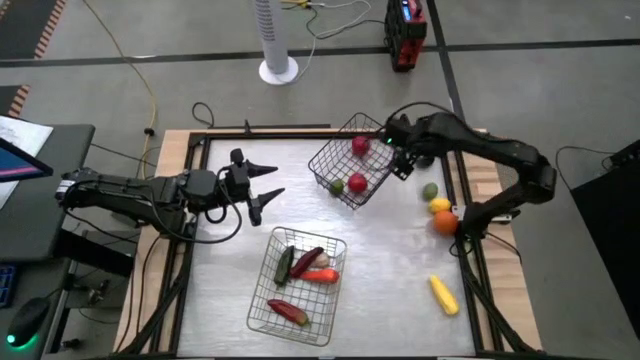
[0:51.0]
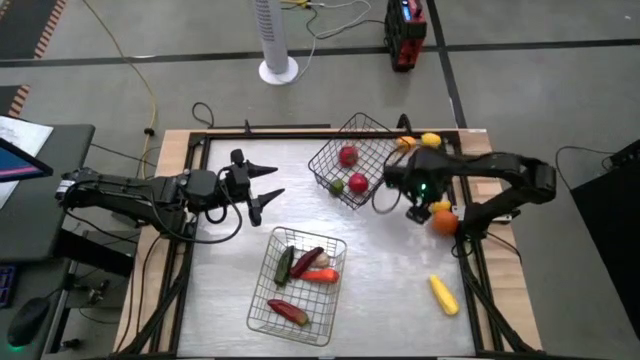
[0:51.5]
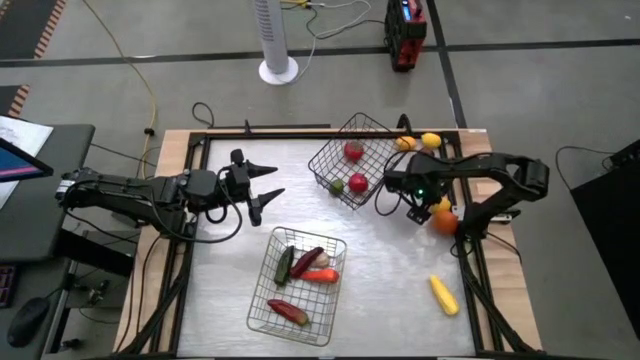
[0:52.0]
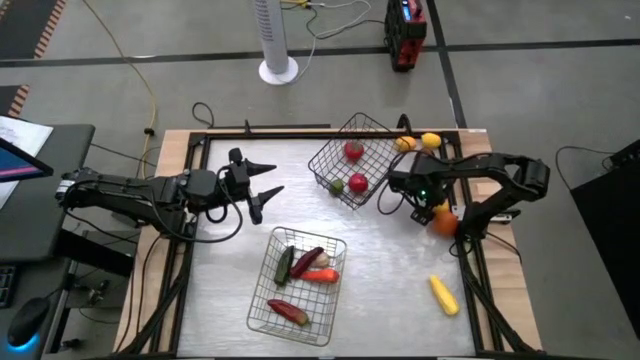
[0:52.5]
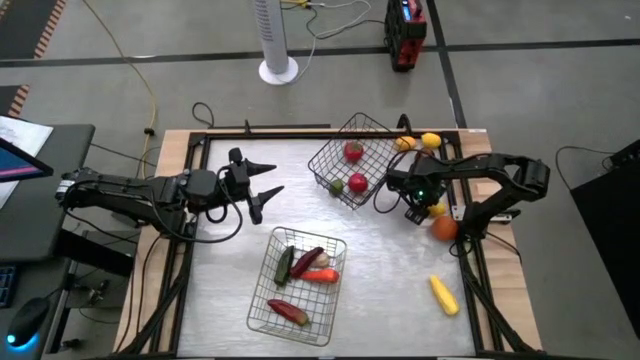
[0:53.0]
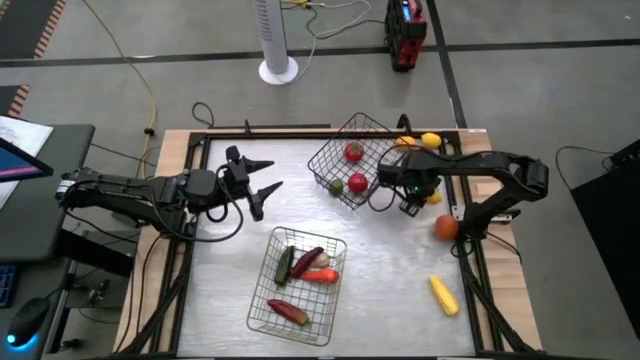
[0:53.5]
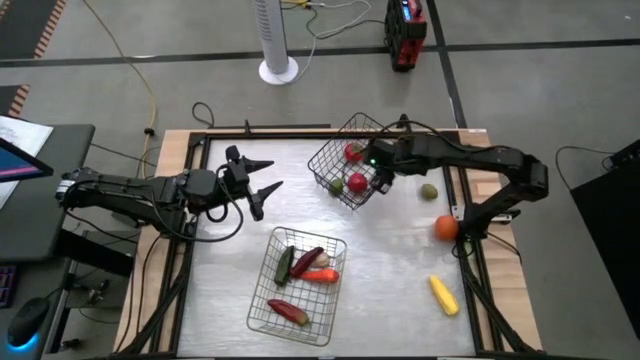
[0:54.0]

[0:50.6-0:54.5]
Task: Sort produce into baskets
Put the bottom yellow lemon into the black wire basket

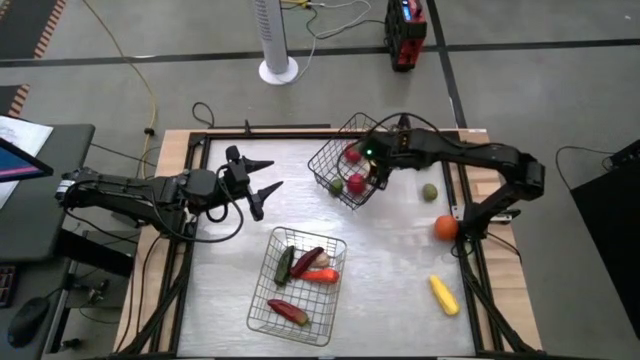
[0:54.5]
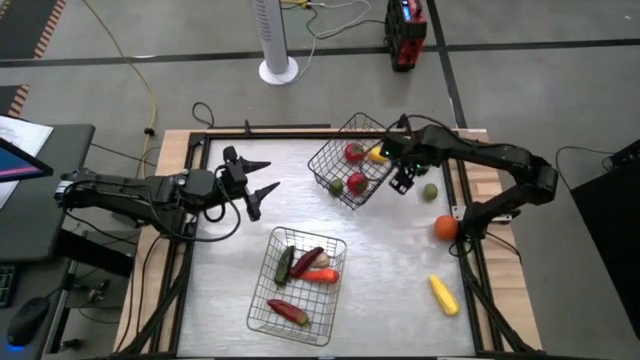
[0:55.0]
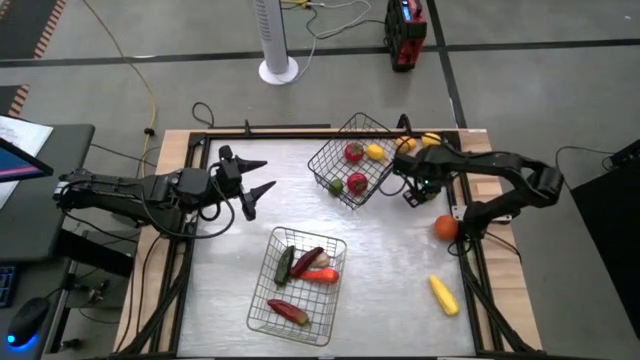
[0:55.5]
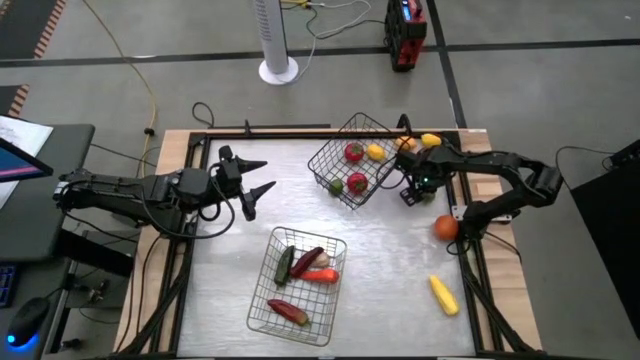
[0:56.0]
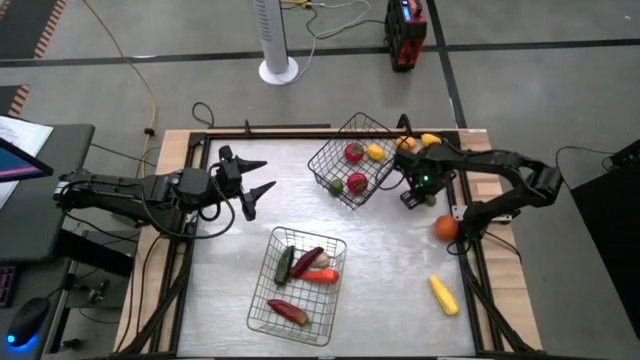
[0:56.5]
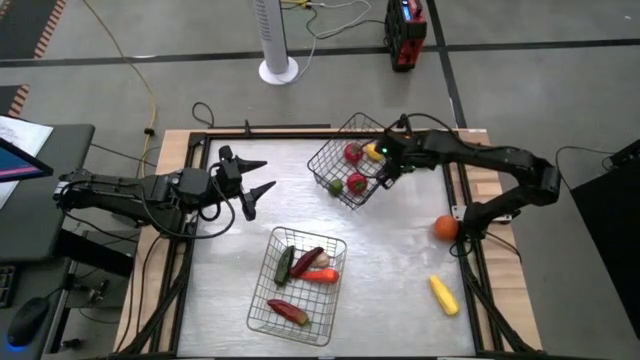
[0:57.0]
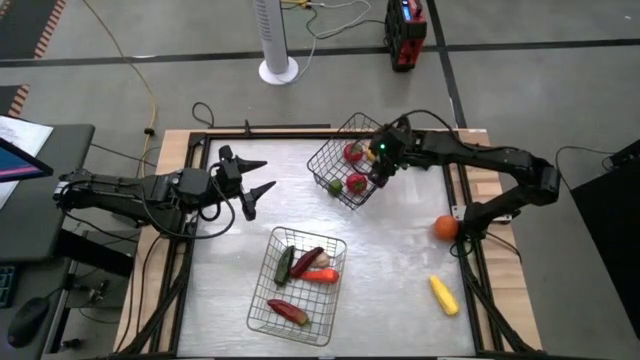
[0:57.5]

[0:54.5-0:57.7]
Put the green lime into the black wire basket

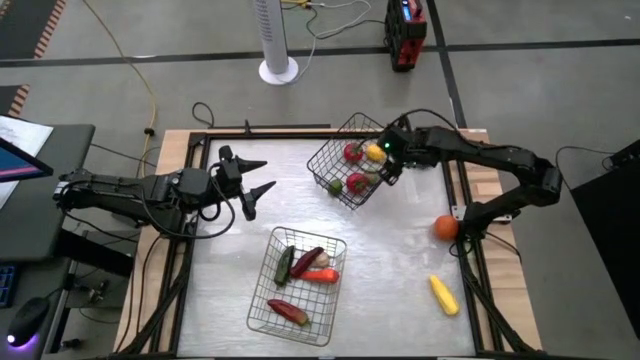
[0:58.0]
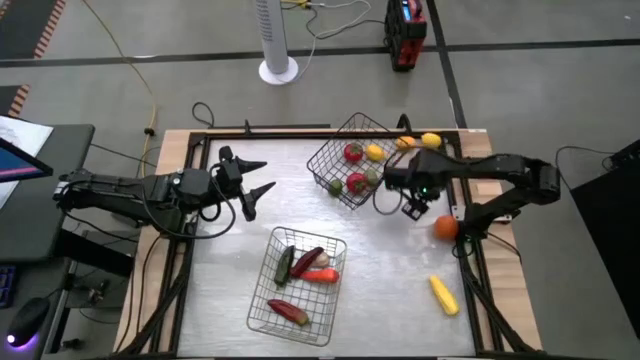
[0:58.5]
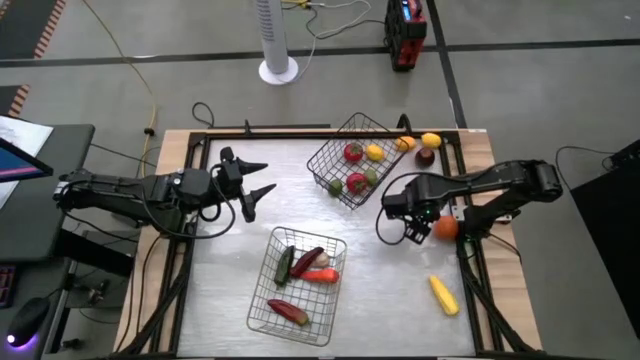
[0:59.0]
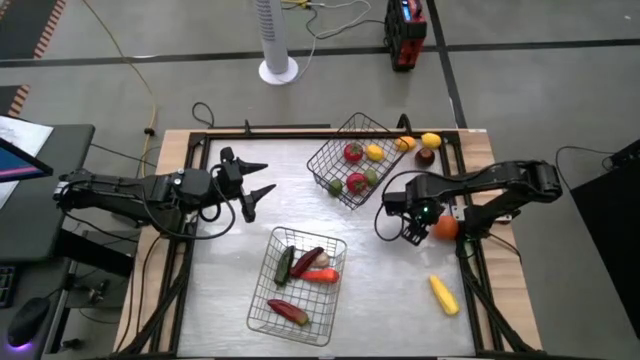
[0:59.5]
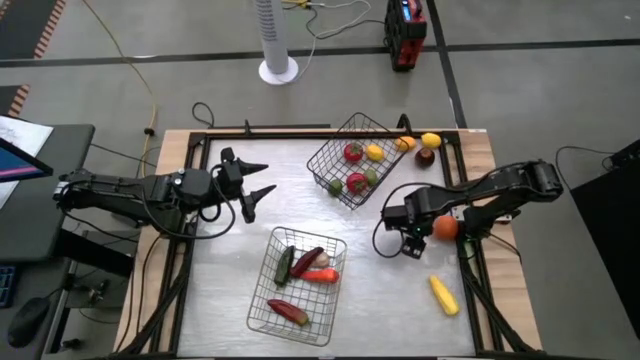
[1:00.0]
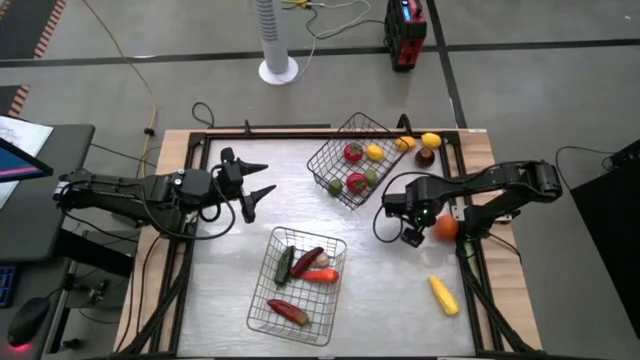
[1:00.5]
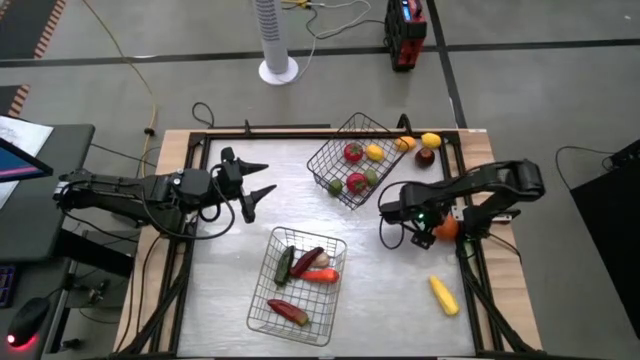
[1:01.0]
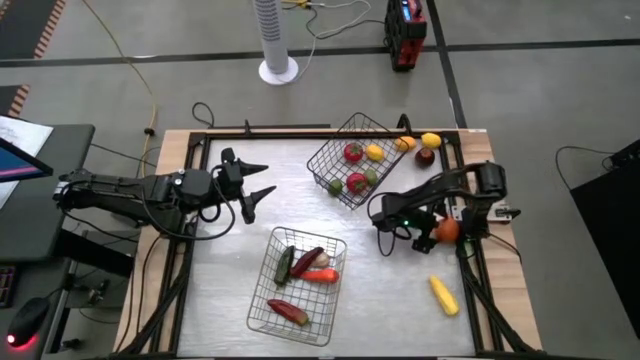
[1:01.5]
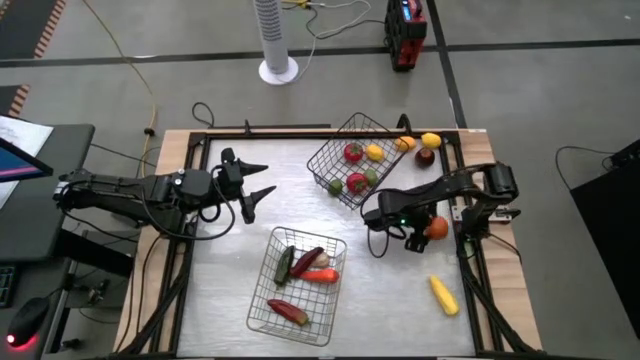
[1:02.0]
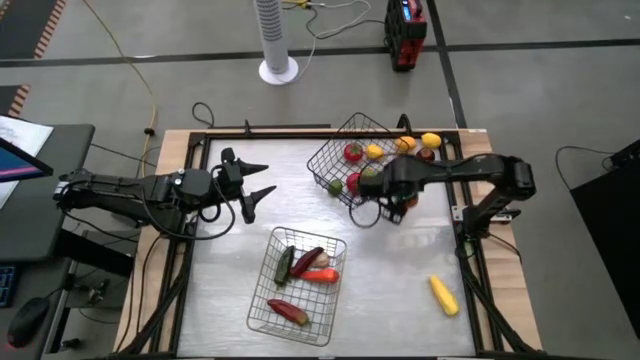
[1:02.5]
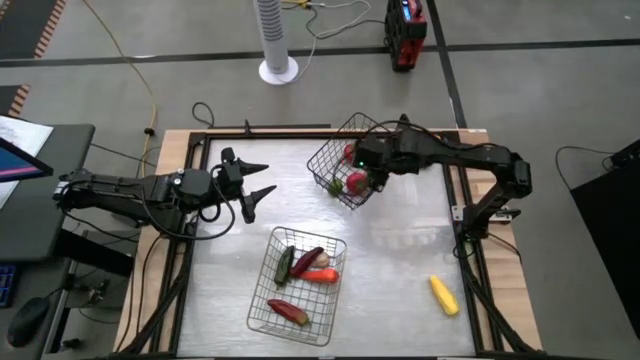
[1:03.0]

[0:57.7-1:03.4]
Put the orange into the black wire basket

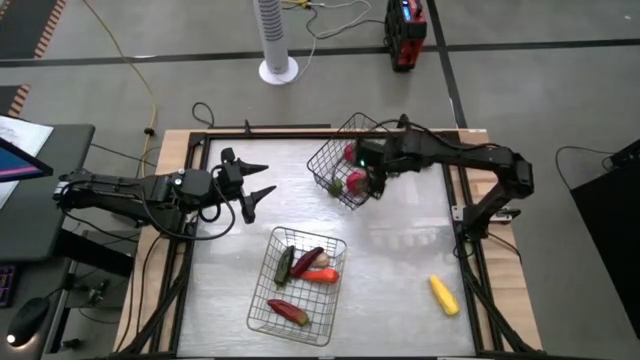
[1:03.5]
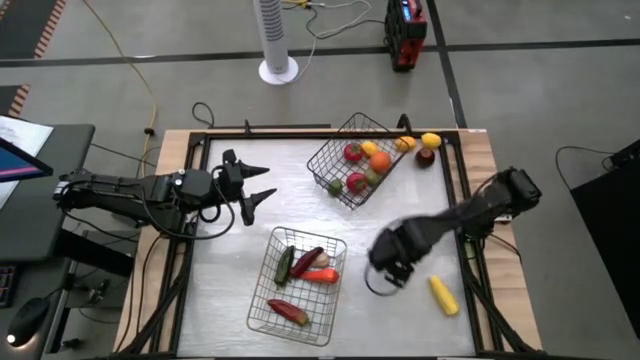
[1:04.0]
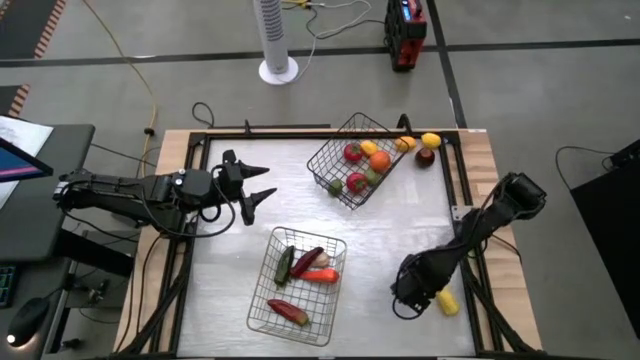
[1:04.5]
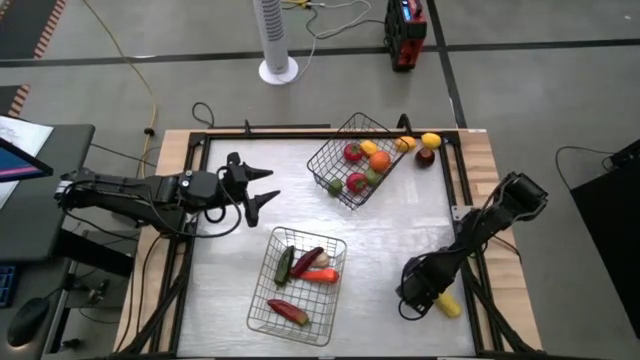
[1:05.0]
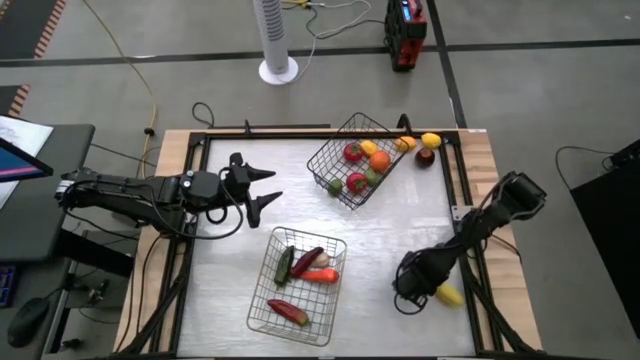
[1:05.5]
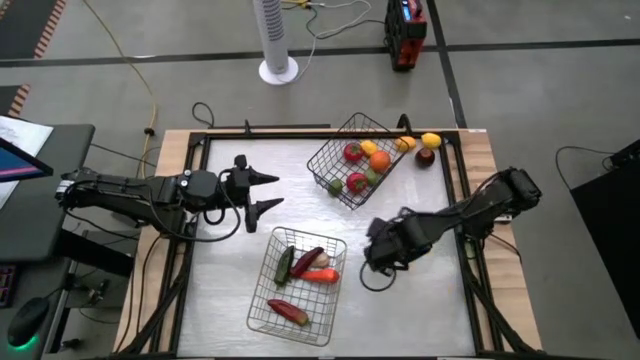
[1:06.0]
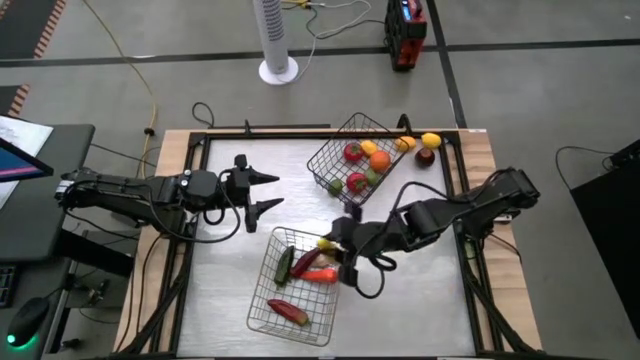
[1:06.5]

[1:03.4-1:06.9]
Put the yellow corn into the gold wire basket

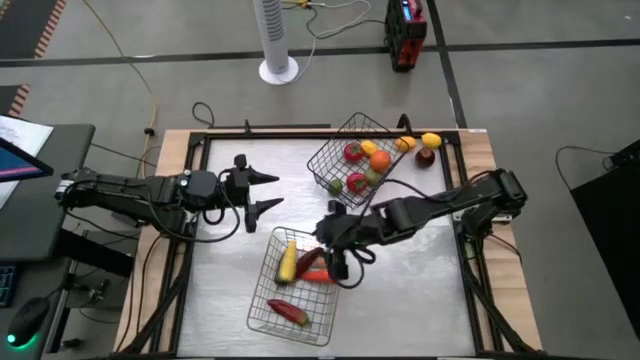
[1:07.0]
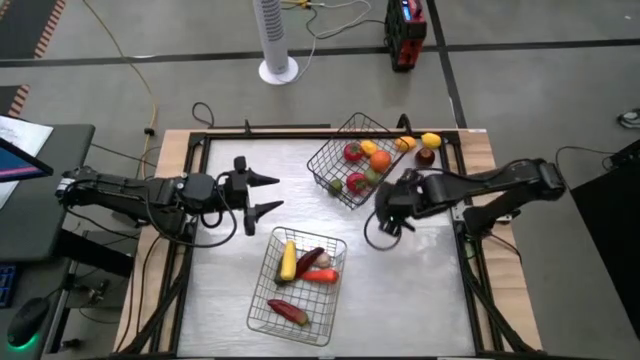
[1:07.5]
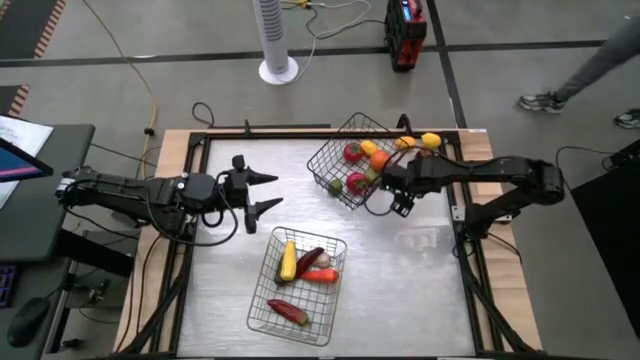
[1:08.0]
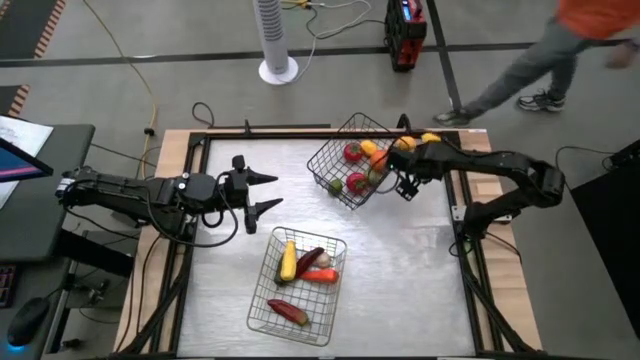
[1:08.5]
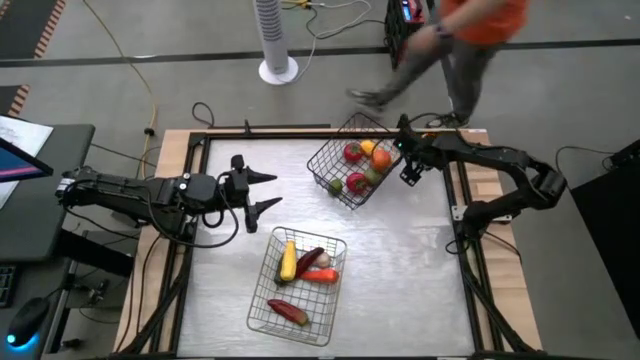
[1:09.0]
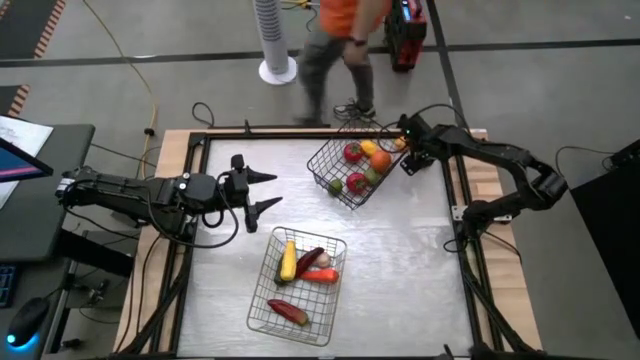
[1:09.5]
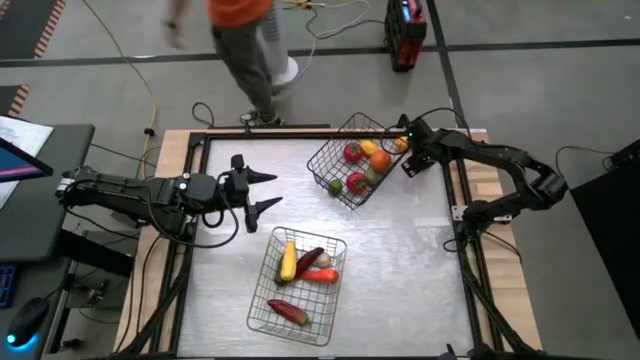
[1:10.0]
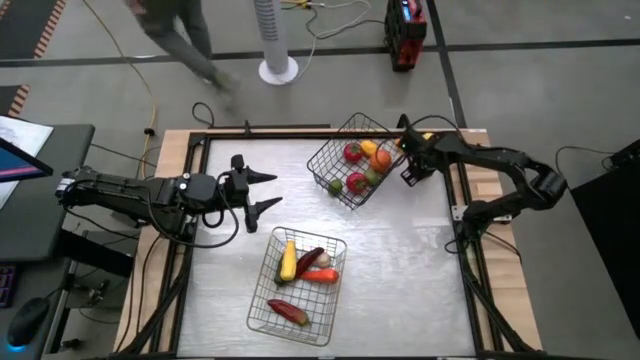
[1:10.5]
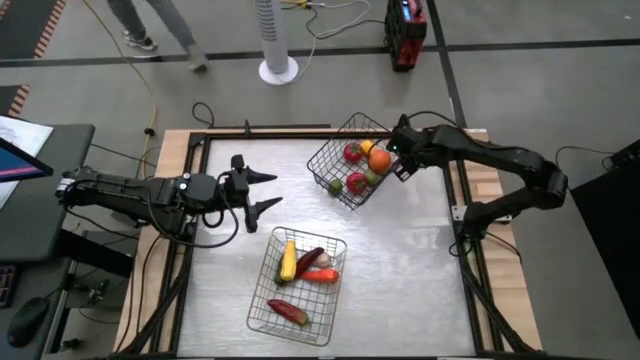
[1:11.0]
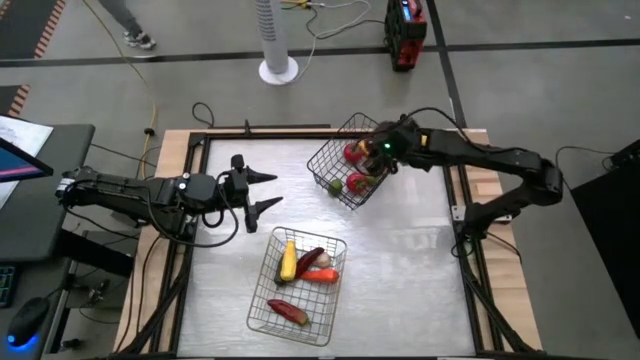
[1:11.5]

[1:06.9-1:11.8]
Put the red apple into the black wire basket
